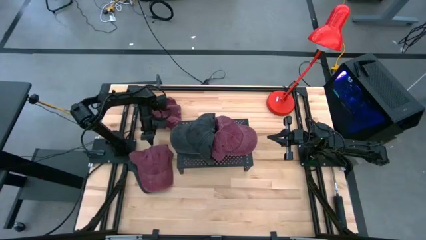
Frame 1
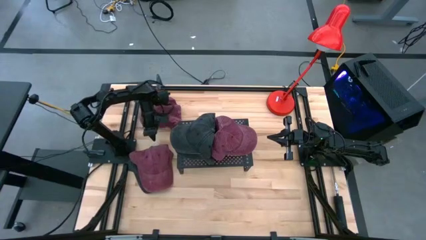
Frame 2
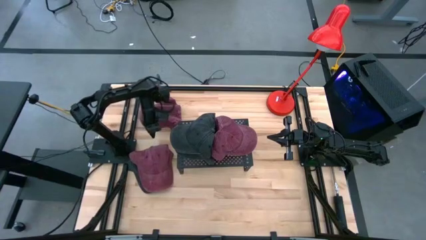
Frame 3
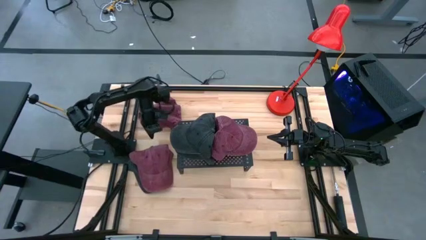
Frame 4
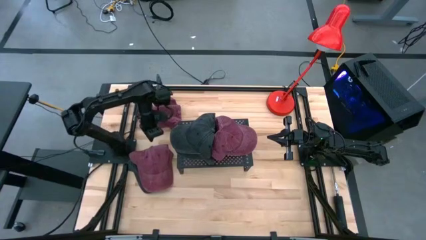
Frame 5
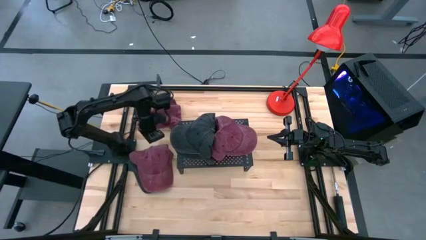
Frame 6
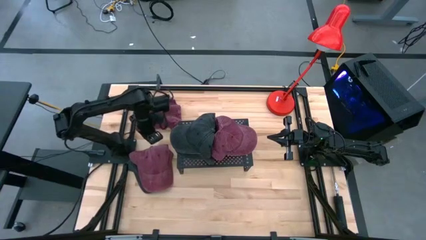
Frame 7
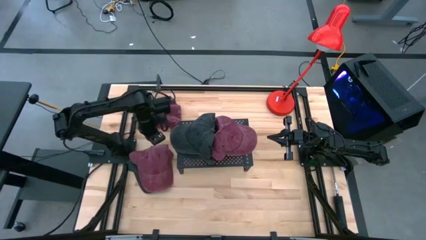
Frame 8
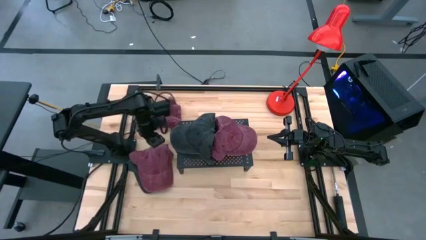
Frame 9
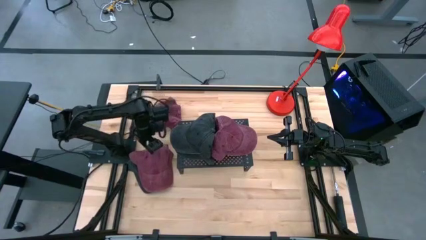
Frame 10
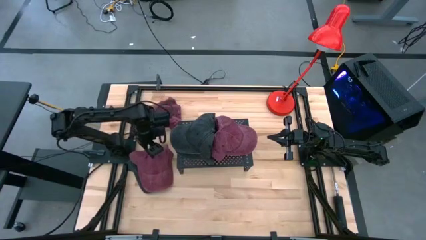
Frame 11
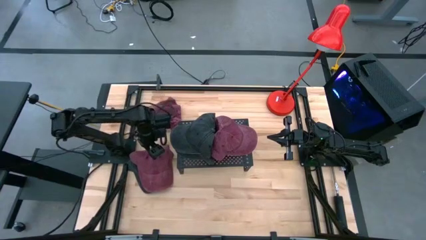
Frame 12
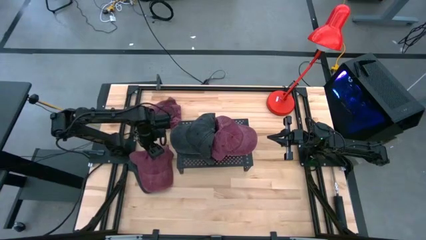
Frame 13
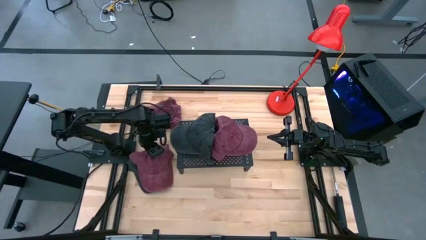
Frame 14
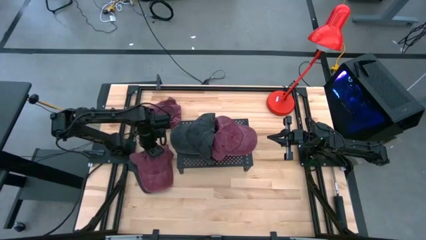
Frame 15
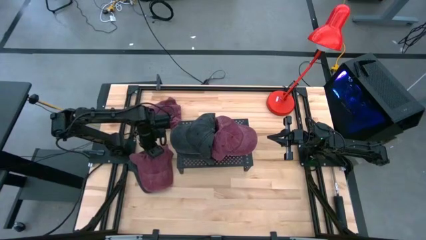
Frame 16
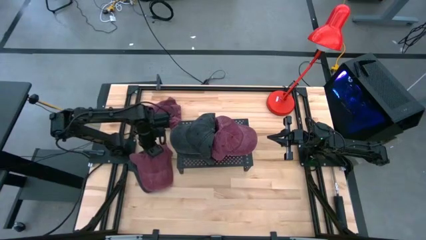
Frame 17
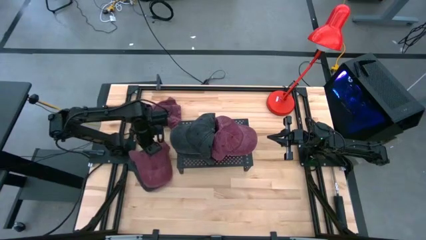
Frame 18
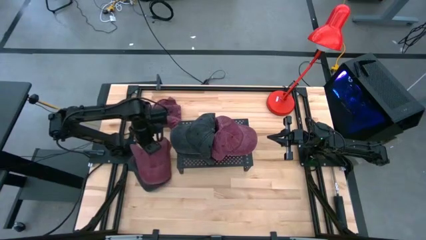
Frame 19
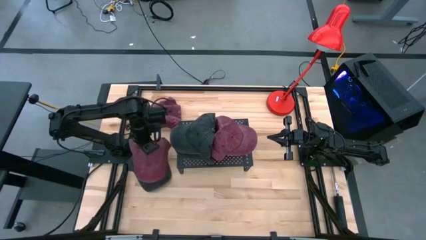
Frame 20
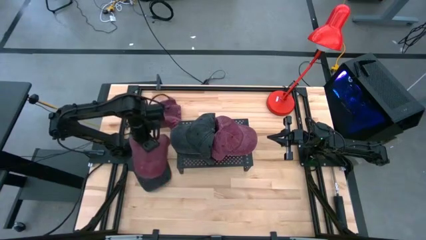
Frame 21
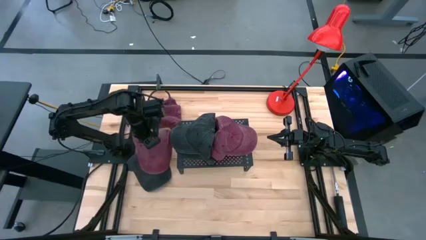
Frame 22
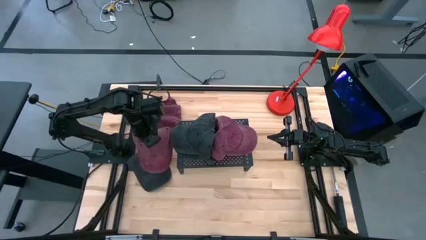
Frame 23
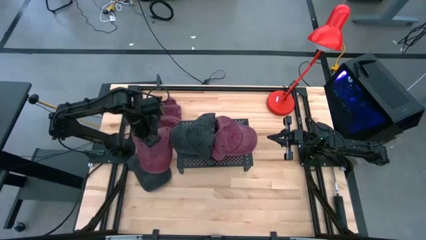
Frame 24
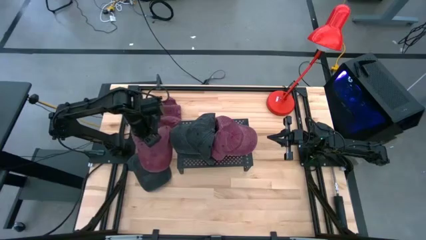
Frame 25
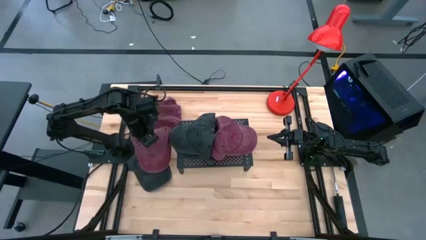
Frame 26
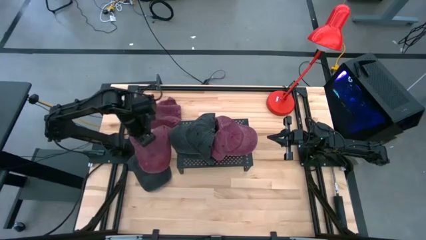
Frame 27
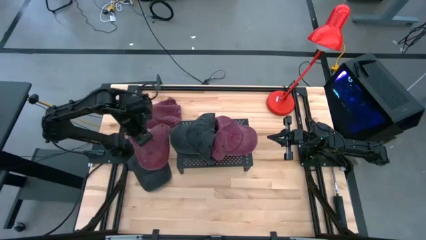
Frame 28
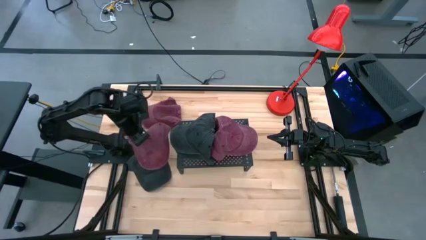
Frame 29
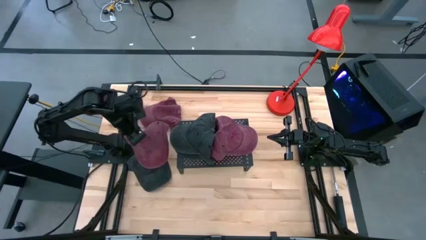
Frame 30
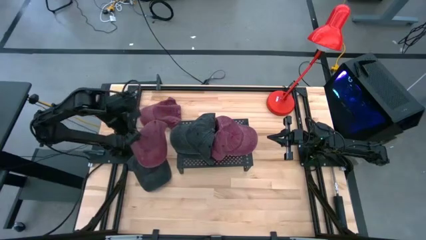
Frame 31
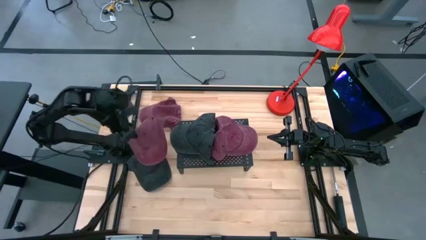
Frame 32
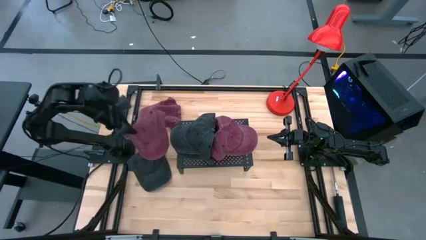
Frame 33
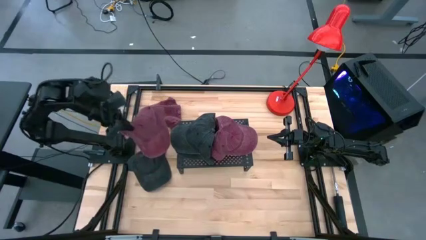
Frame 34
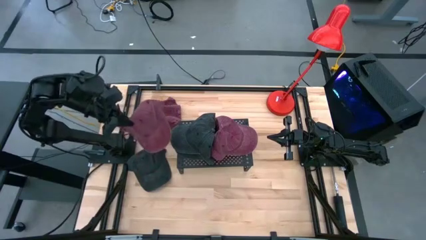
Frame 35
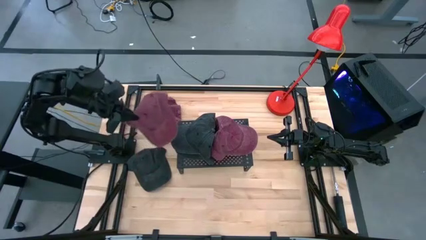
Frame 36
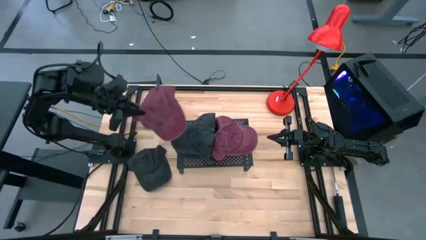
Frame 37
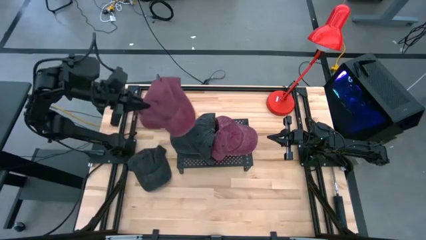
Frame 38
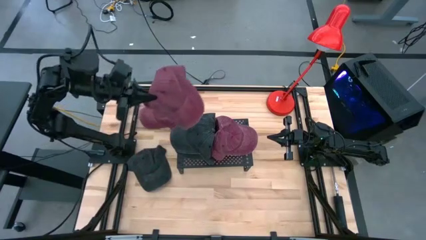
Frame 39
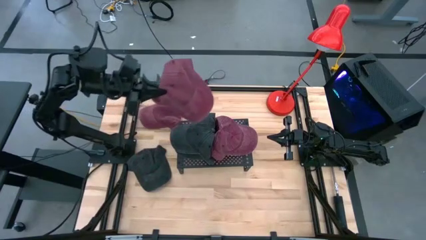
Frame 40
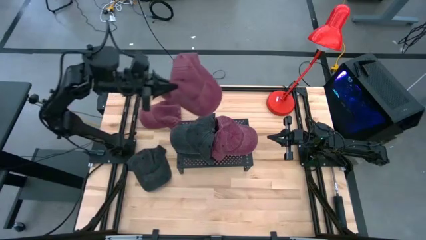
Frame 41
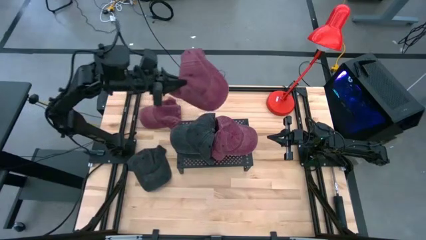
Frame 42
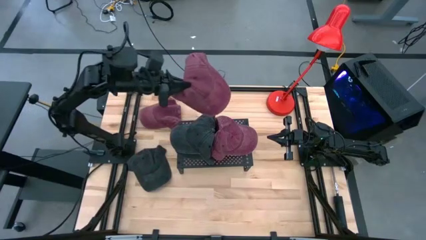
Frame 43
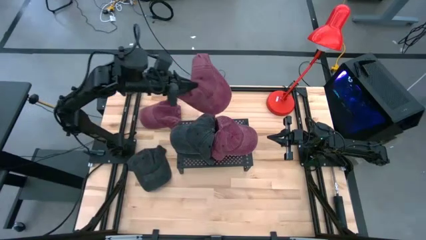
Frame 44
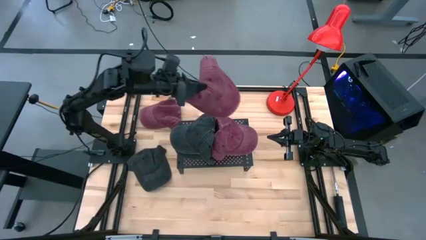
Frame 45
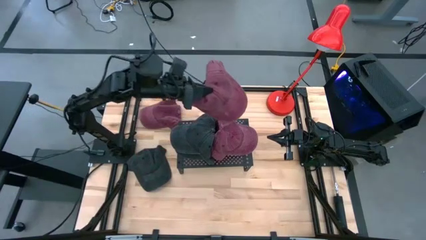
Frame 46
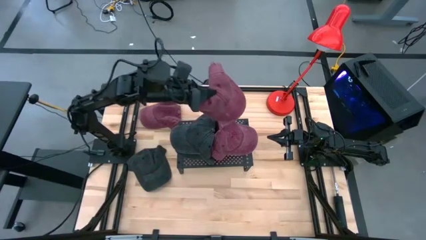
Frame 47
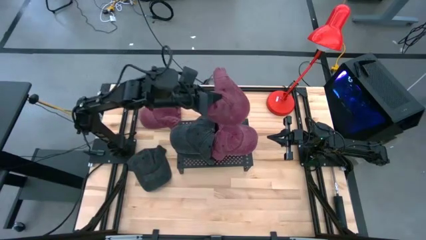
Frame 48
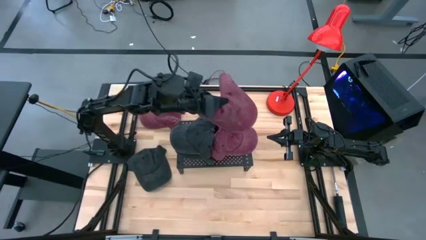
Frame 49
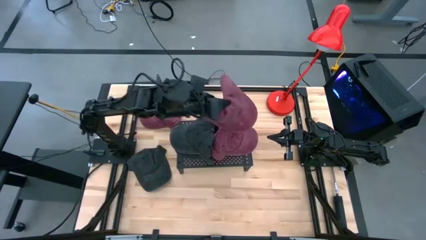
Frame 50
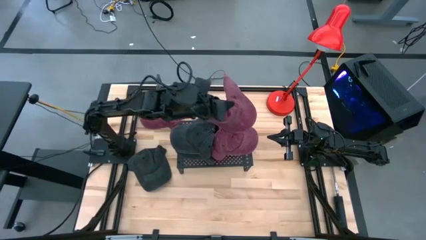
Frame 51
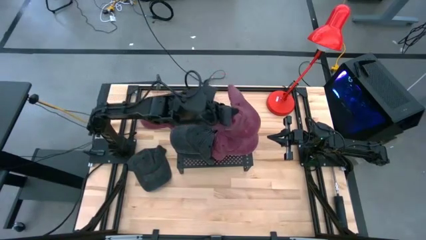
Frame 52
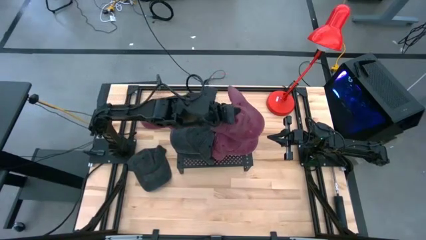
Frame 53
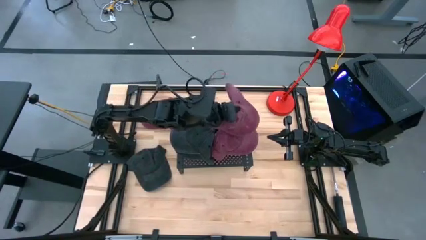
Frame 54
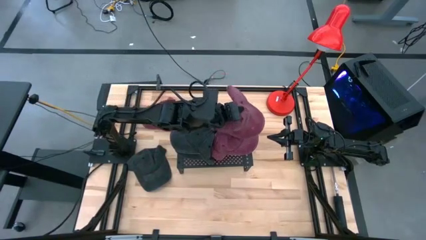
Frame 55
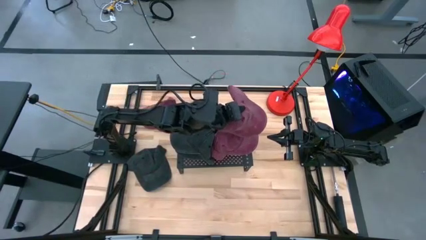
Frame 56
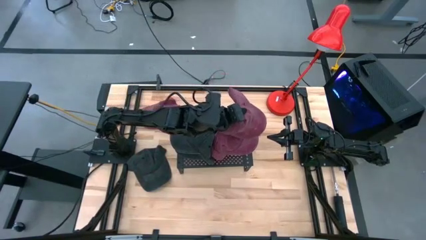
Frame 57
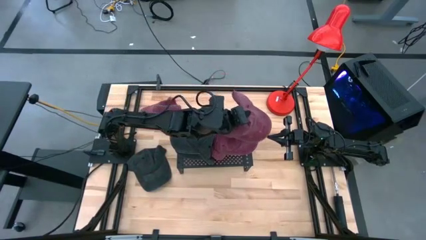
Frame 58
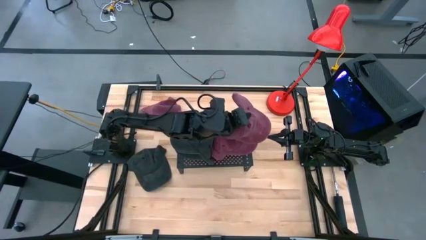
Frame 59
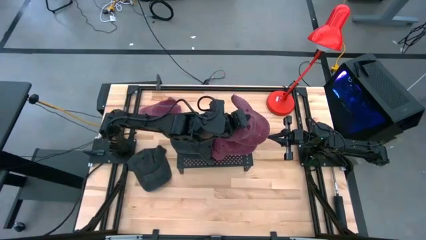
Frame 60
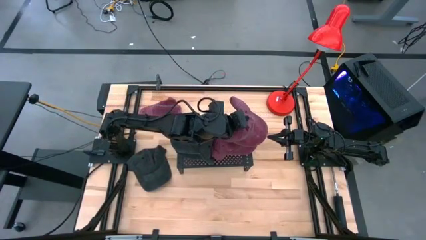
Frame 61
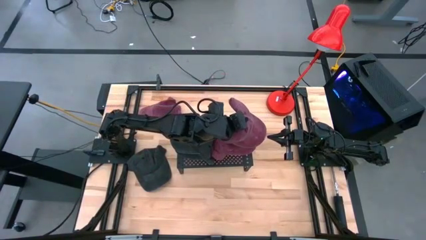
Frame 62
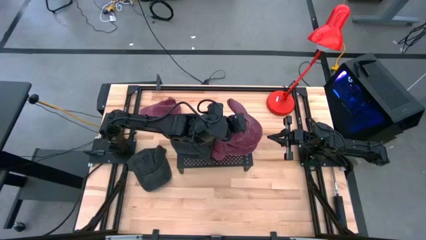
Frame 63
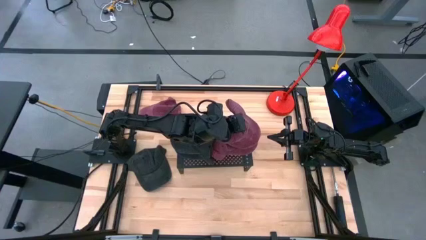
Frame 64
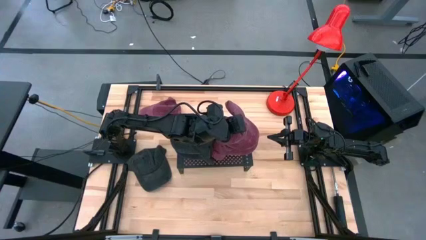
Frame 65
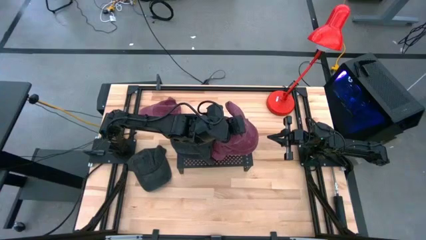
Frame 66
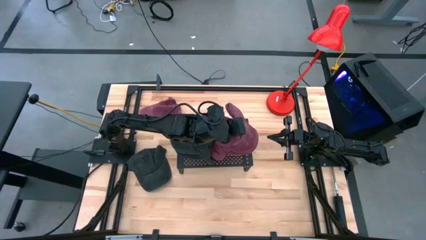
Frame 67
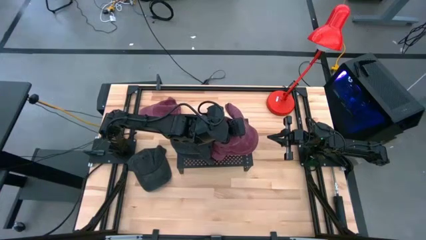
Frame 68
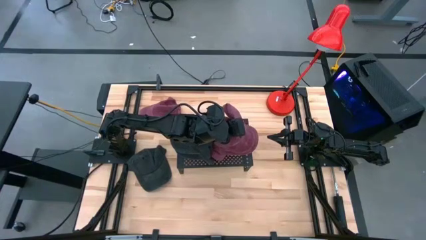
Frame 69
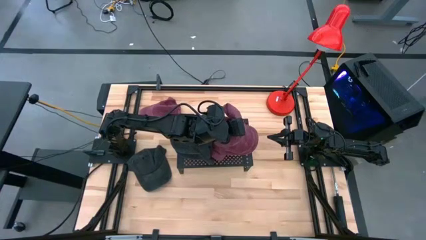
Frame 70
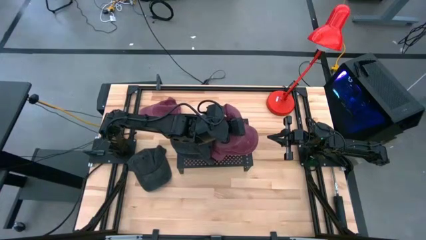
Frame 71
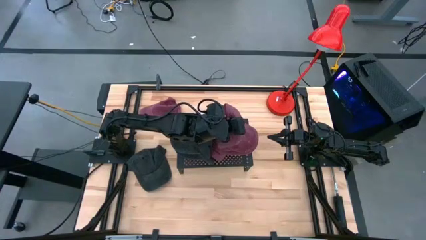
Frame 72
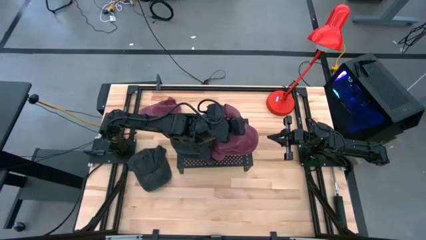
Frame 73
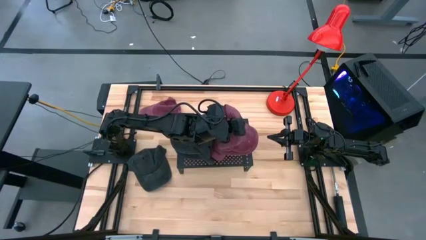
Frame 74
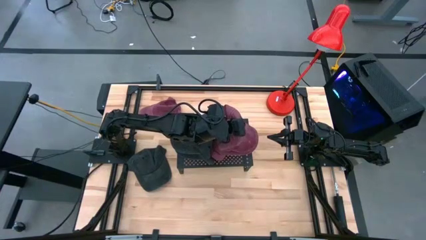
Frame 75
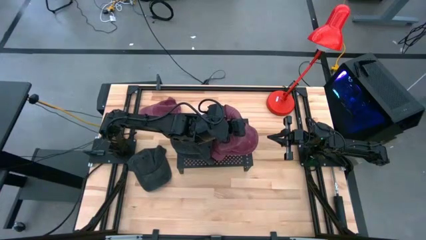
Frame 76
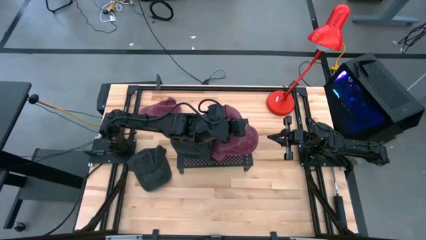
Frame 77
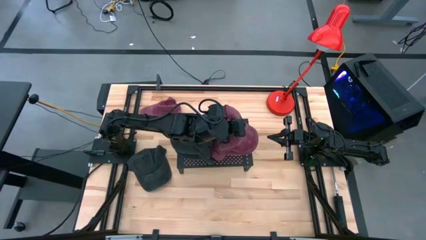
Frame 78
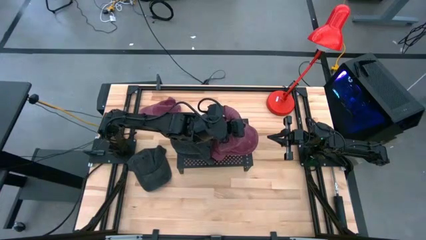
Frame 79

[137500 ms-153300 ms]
Task: Pick & Place hat
Stack the bottom red cap on top of the red cap on the shelf

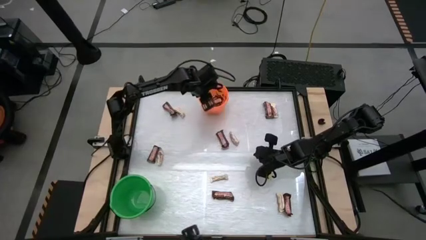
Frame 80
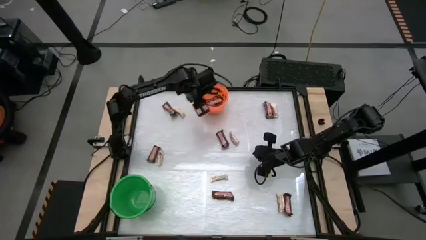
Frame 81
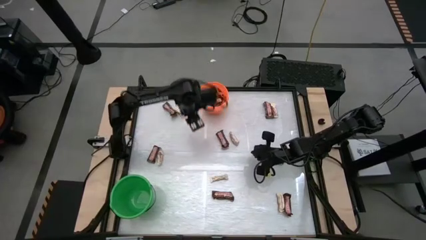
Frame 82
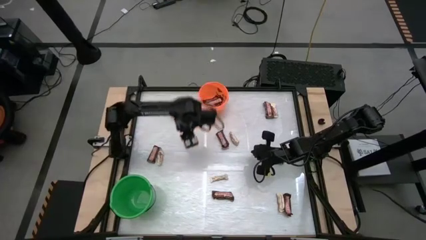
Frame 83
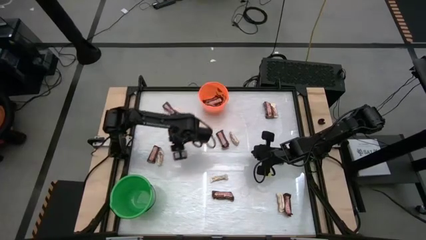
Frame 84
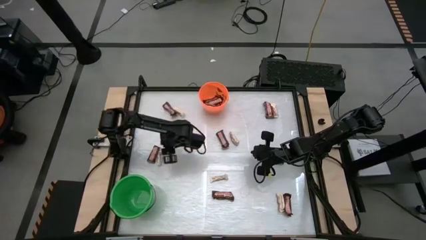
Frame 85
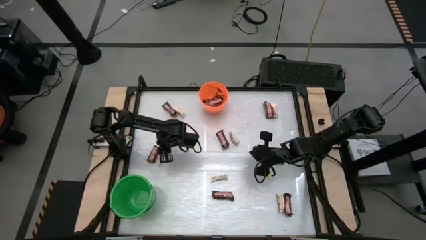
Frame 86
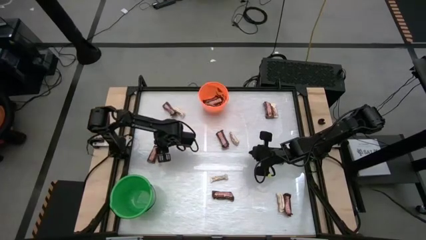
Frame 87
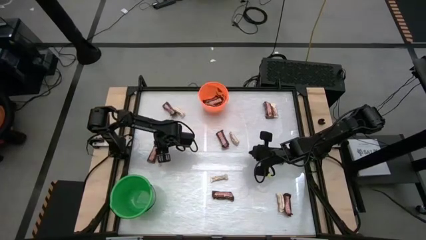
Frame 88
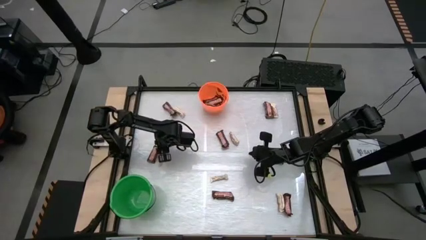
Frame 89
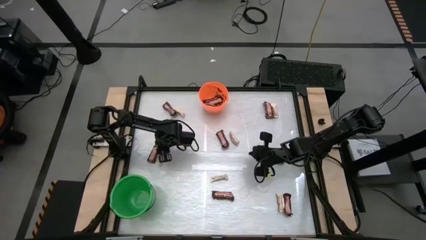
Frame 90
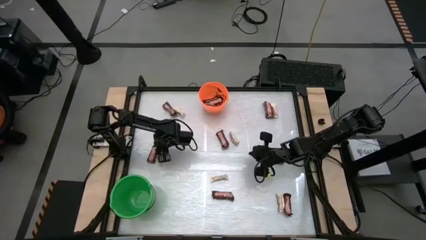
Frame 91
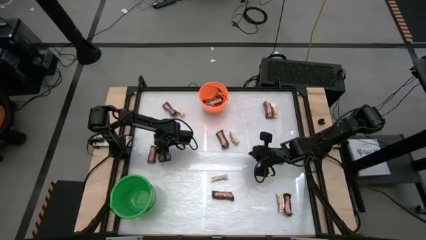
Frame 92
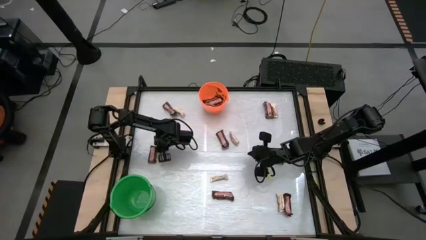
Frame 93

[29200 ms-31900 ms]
Task: Sort candy by brand, put in halloween buckets
Put the brown chocolate bar into the orange bucket
